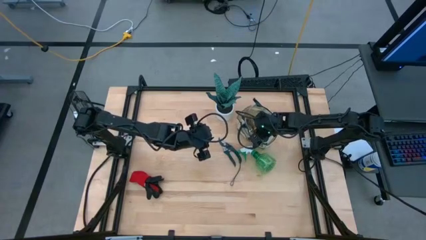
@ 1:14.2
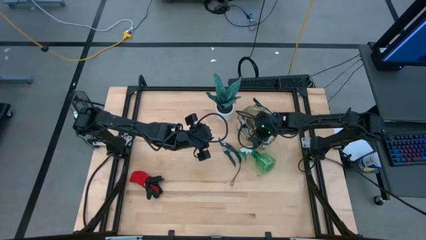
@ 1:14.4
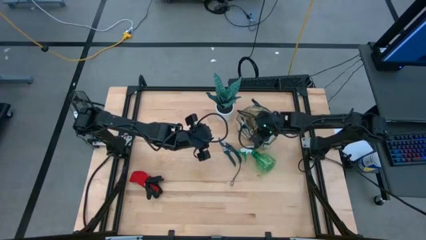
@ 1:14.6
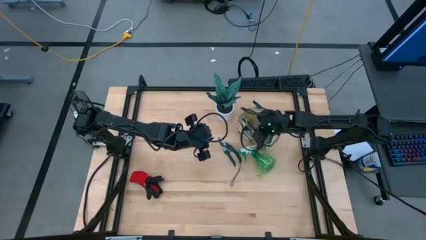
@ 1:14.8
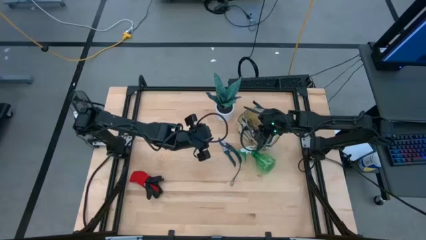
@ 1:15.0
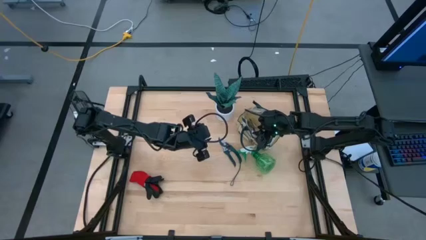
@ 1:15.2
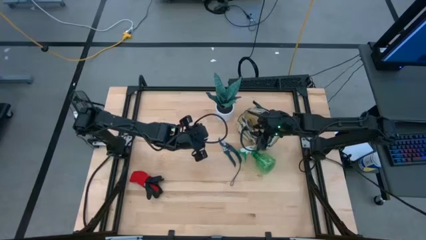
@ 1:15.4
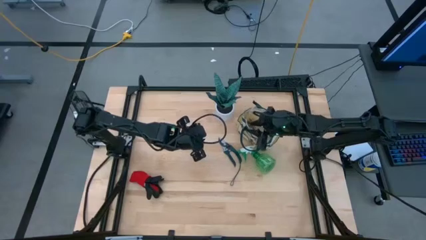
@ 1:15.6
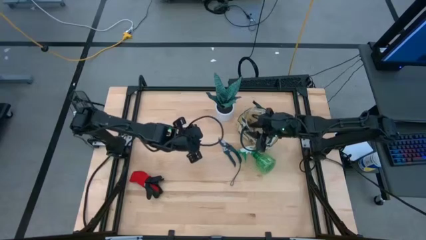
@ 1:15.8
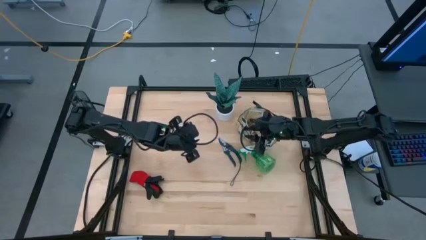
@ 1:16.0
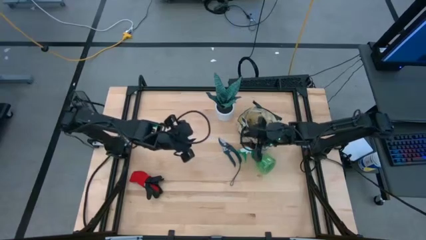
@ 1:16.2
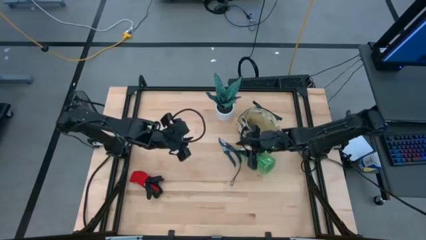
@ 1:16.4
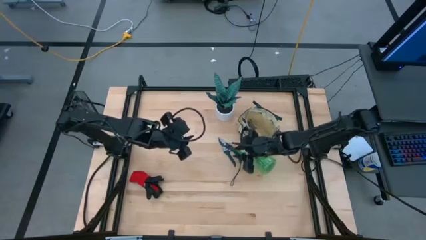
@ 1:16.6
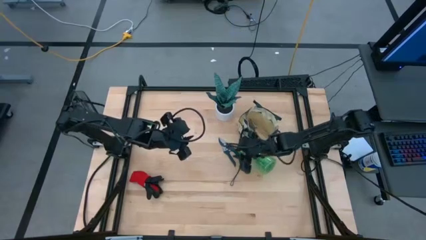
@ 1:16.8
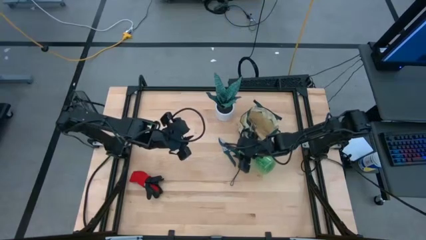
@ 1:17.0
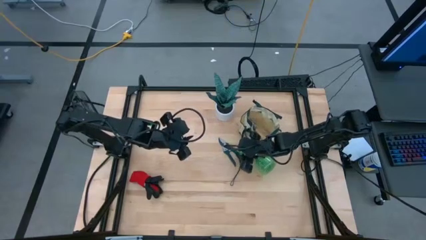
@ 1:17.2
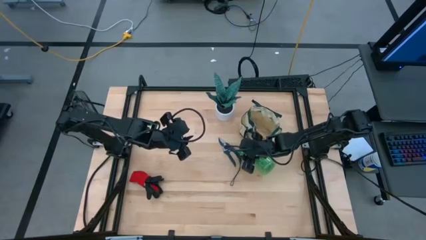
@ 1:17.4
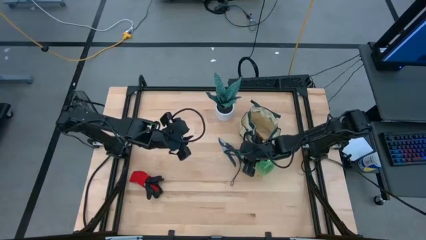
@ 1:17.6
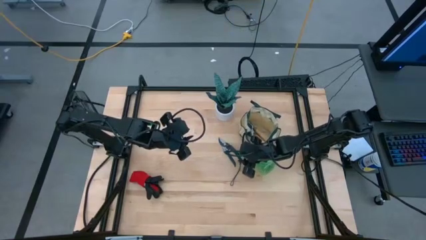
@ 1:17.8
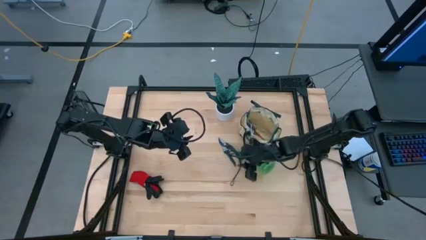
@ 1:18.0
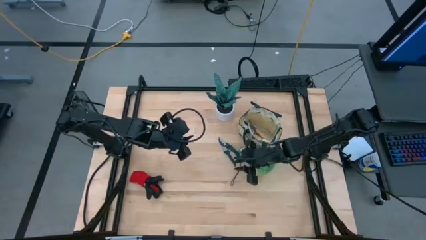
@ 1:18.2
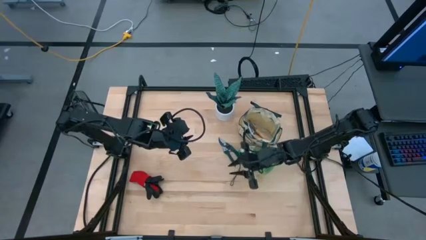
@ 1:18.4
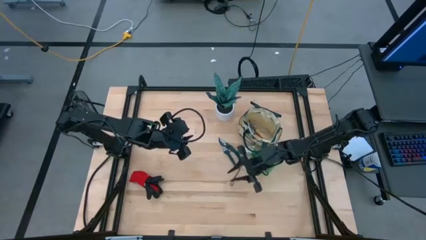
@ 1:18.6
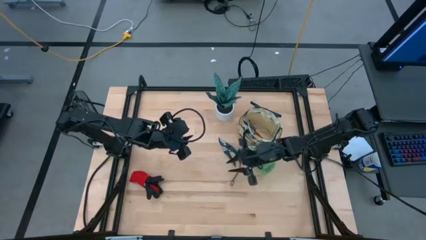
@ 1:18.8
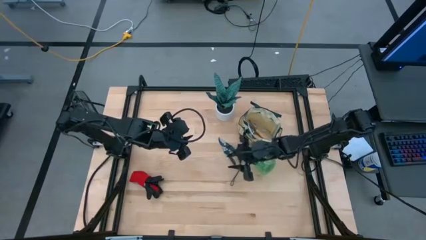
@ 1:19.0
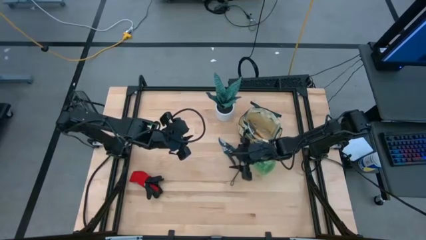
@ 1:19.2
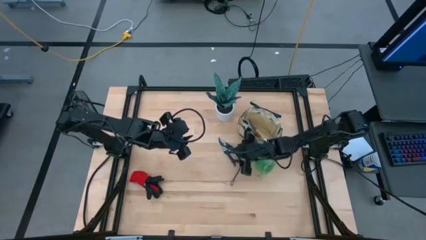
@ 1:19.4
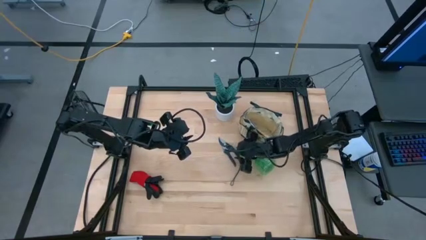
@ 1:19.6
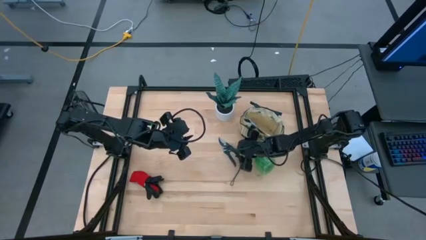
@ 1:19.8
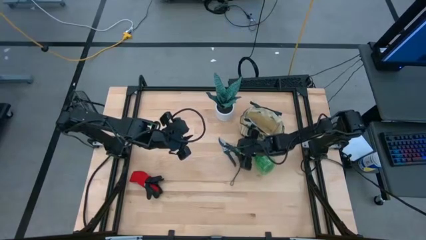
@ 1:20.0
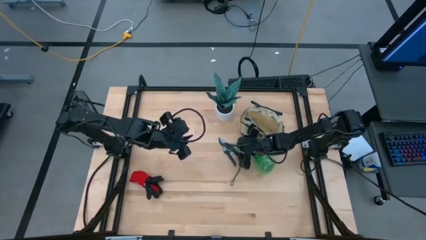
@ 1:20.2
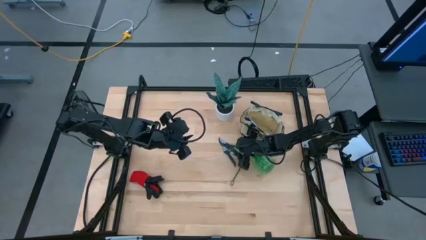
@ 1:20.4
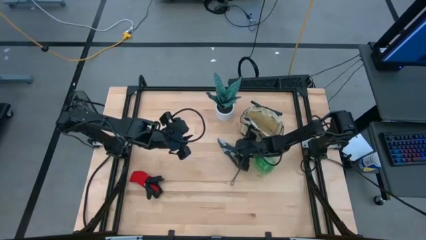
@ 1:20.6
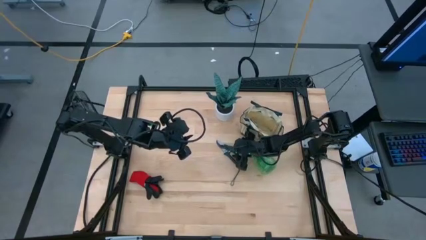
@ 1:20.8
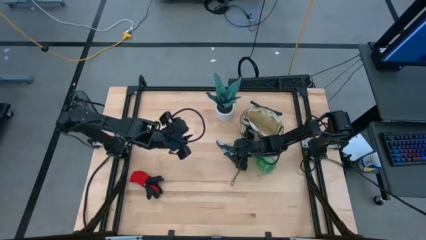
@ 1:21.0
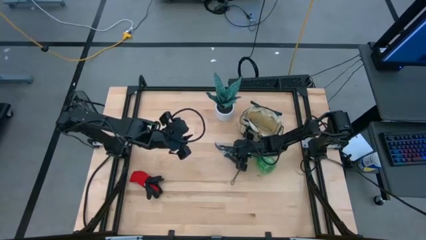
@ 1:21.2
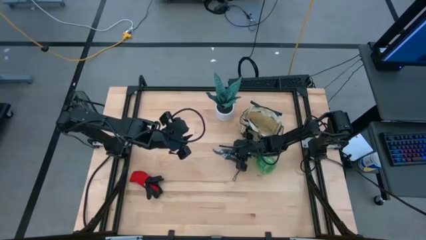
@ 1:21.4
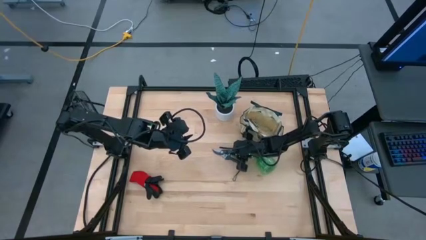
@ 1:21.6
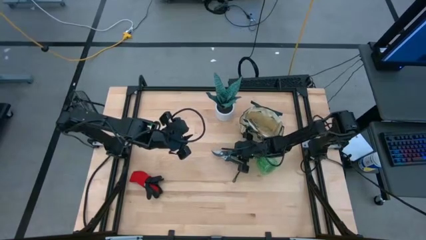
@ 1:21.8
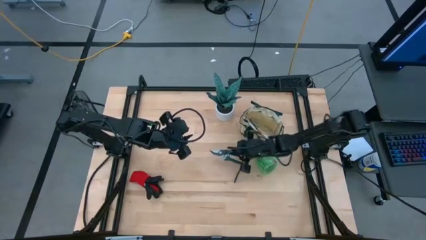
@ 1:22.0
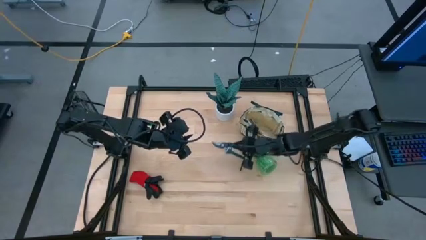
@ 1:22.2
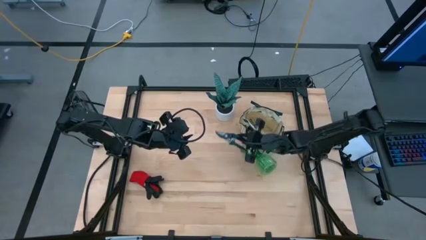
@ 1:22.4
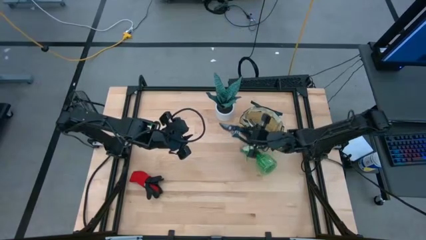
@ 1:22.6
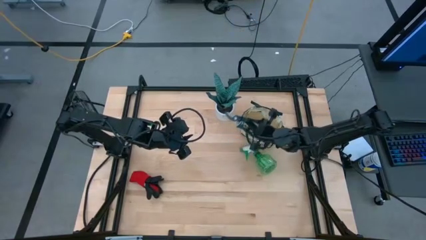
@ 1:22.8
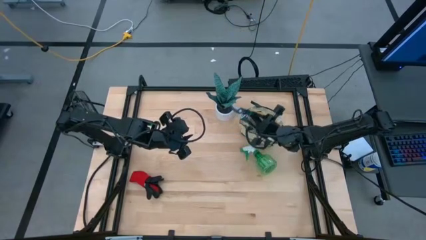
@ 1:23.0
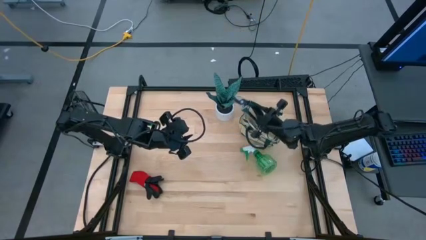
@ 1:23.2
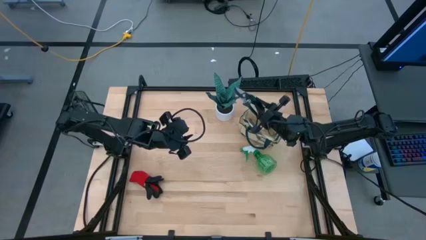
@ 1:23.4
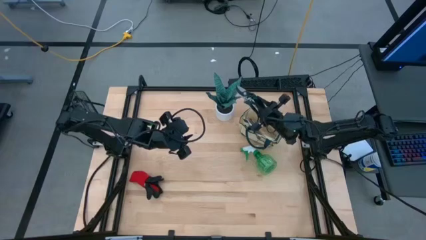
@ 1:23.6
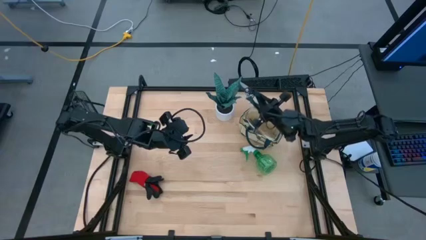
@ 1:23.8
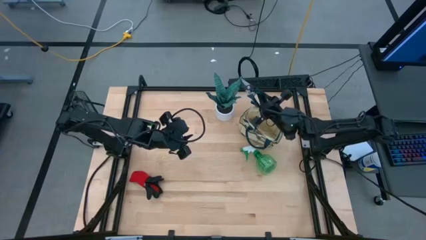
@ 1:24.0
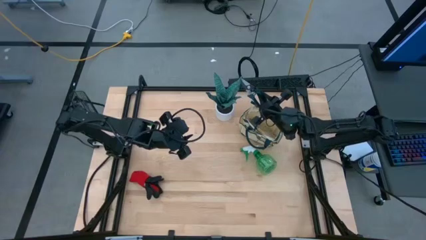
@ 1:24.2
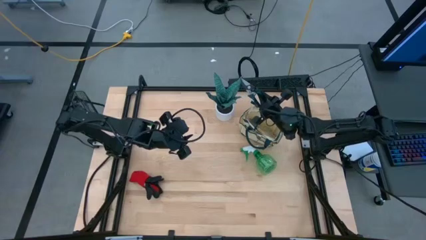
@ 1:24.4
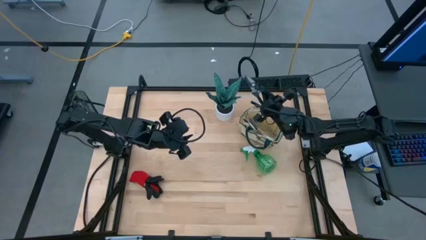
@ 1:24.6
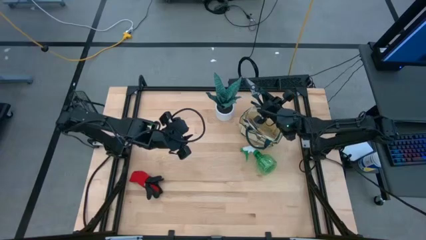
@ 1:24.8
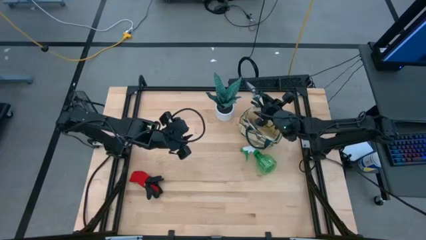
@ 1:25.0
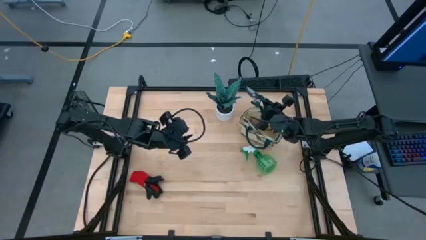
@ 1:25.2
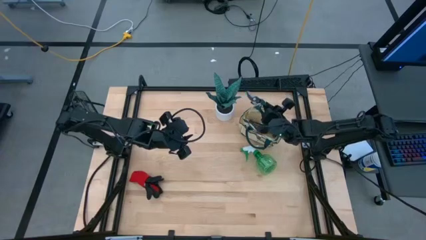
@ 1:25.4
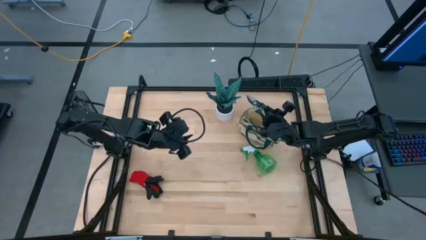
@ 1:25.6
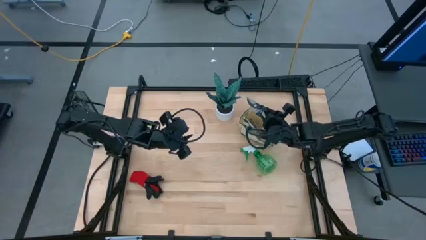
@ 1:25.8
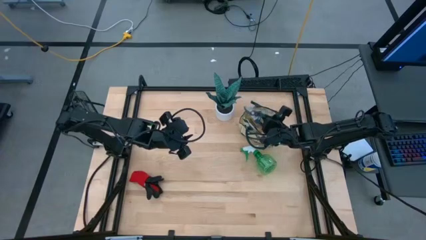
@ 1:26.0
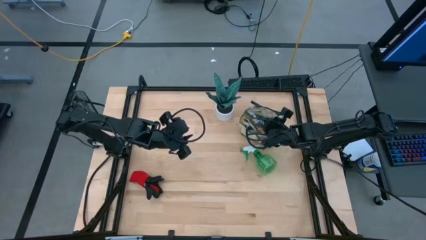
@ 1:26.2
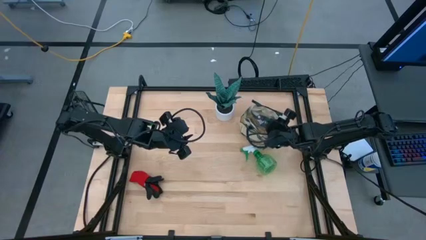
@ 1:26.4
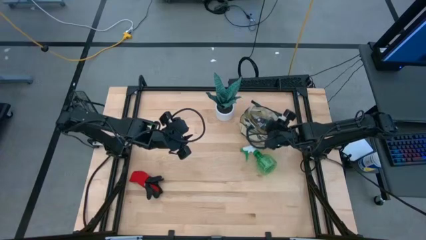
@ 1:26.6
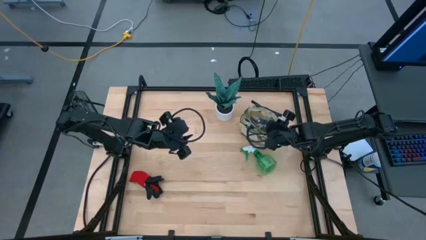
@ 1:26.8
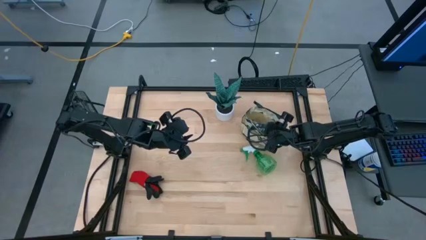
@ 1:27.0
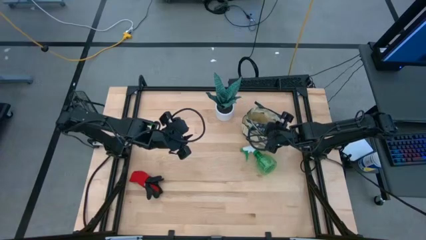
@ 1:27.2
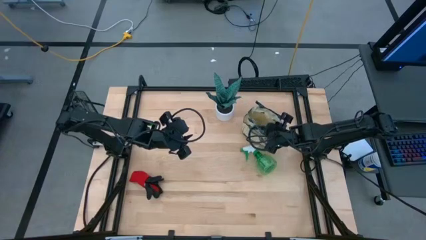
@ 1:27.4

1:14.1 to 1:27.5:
Task: Pick & Place Garden tools in Gardening bag
Put the black shear scissors into the gardening bag
